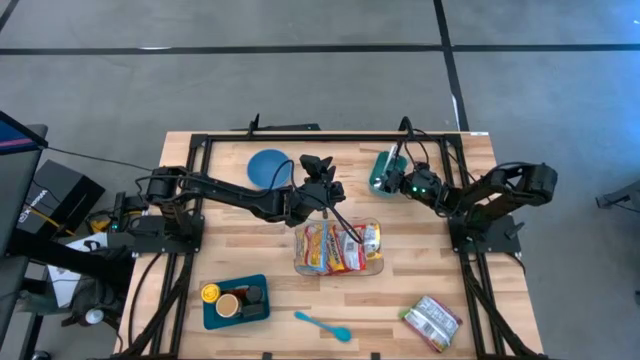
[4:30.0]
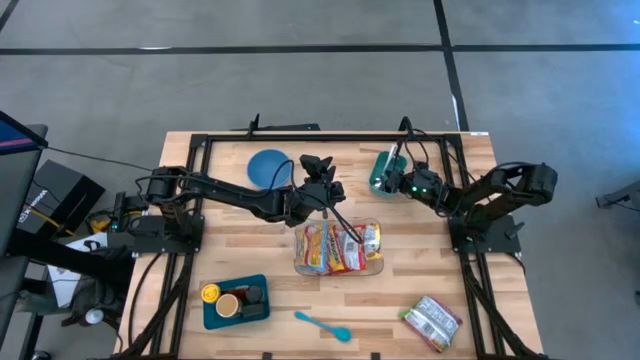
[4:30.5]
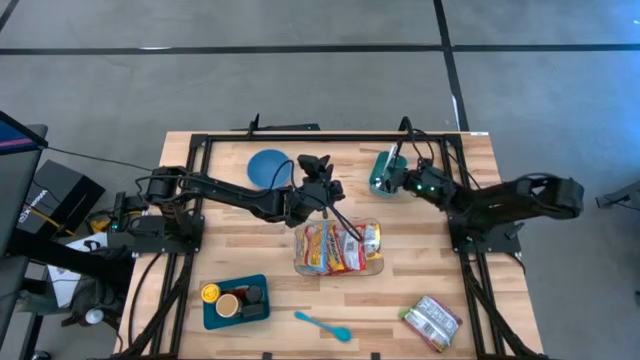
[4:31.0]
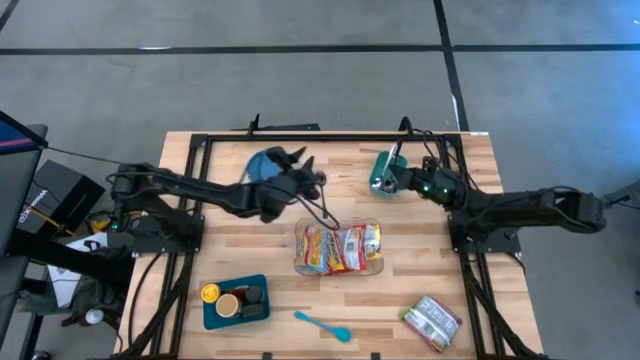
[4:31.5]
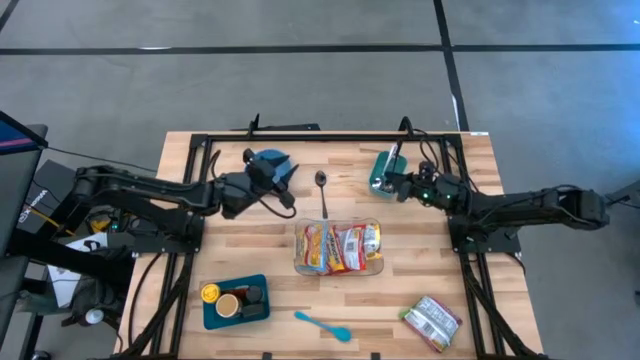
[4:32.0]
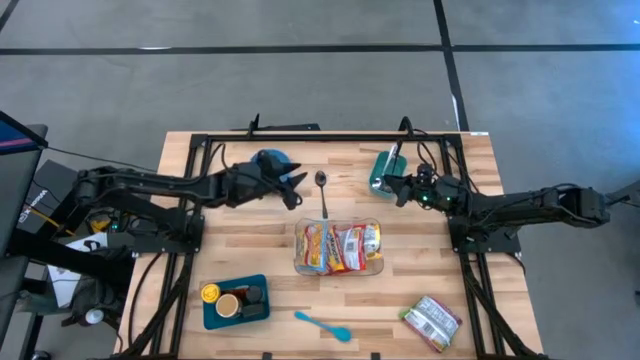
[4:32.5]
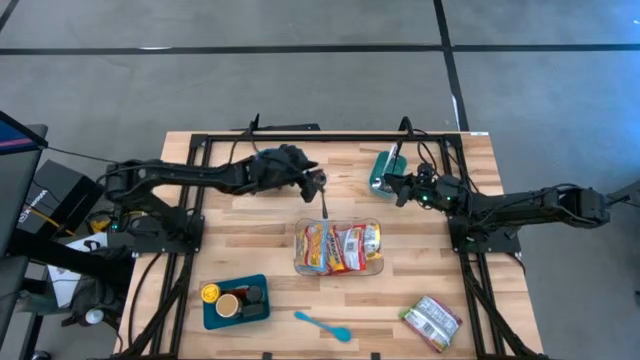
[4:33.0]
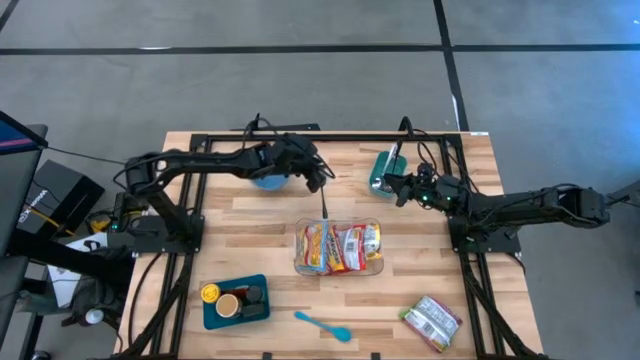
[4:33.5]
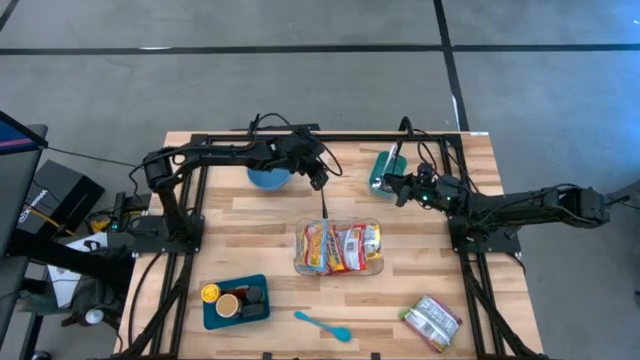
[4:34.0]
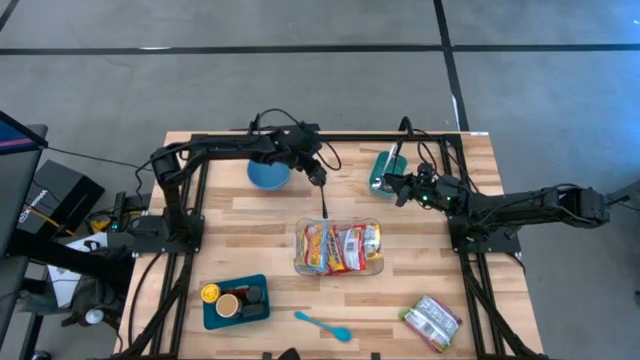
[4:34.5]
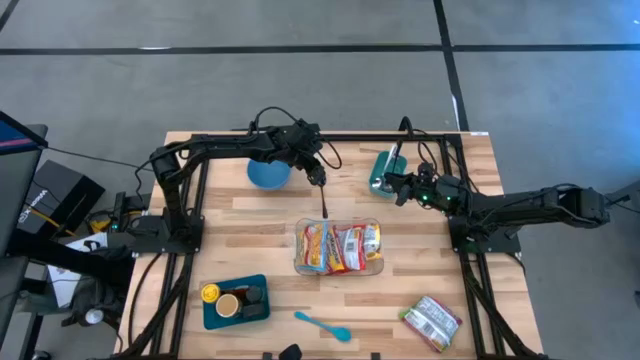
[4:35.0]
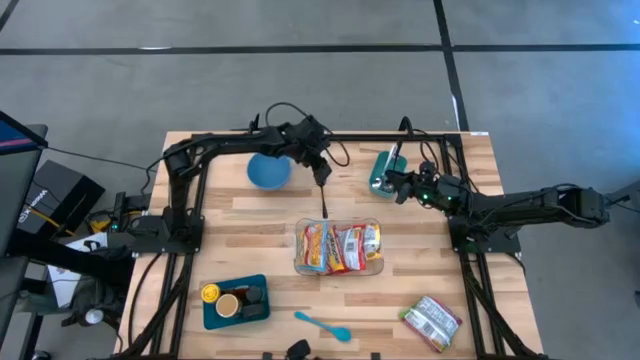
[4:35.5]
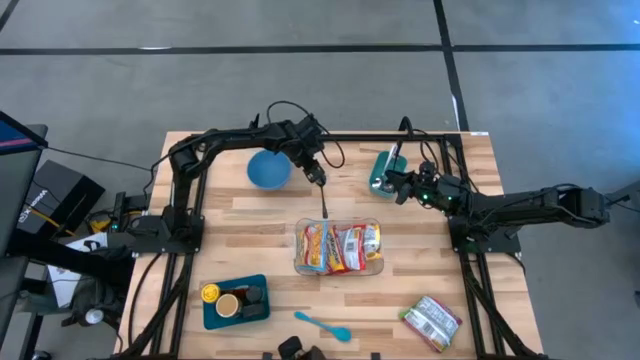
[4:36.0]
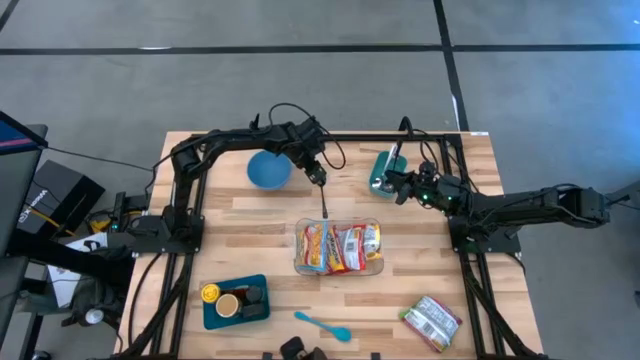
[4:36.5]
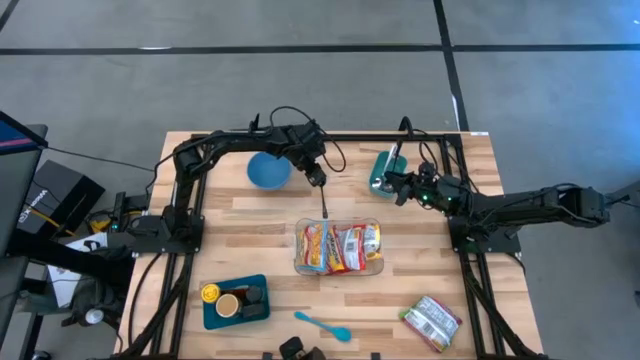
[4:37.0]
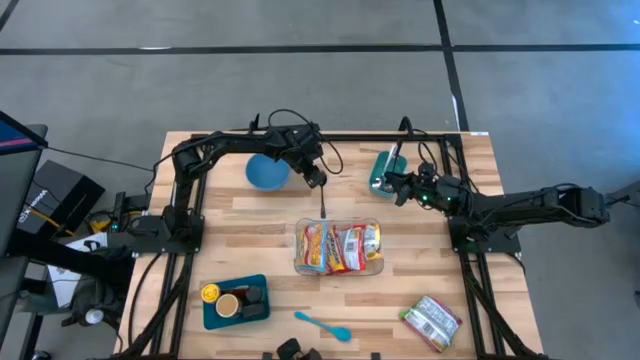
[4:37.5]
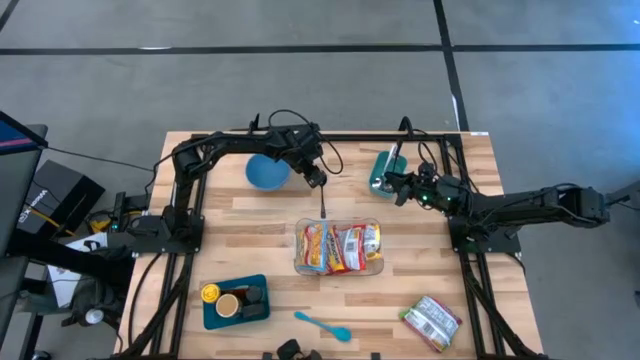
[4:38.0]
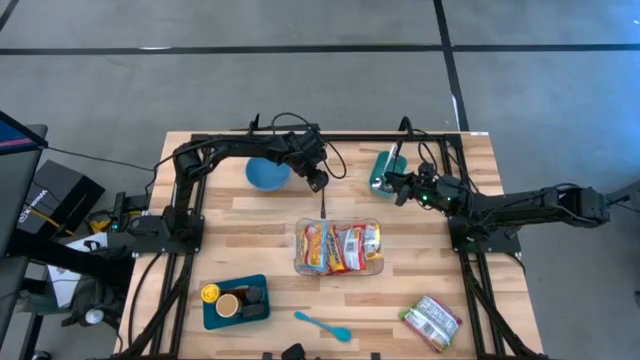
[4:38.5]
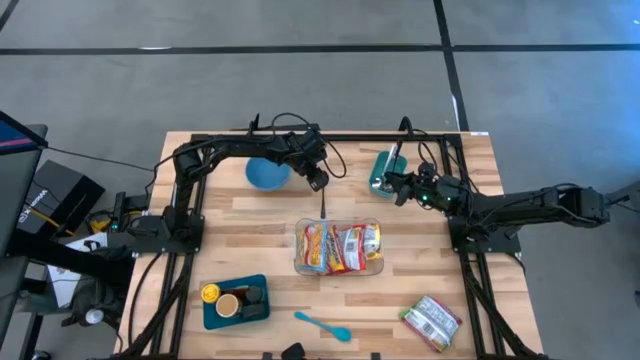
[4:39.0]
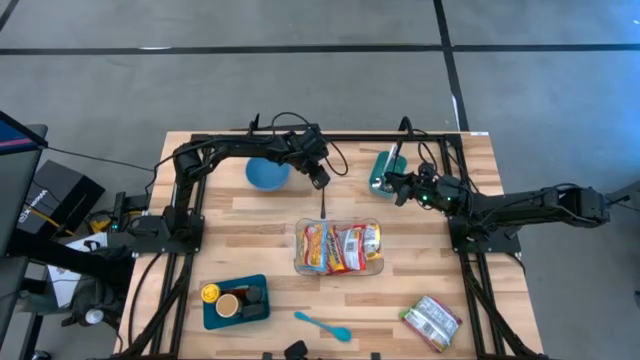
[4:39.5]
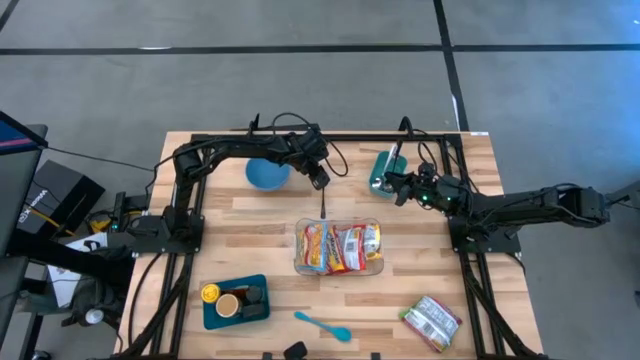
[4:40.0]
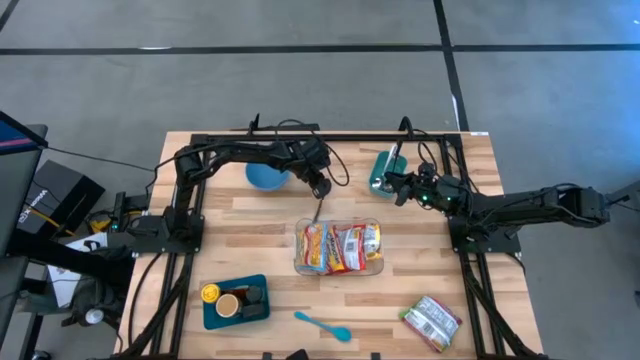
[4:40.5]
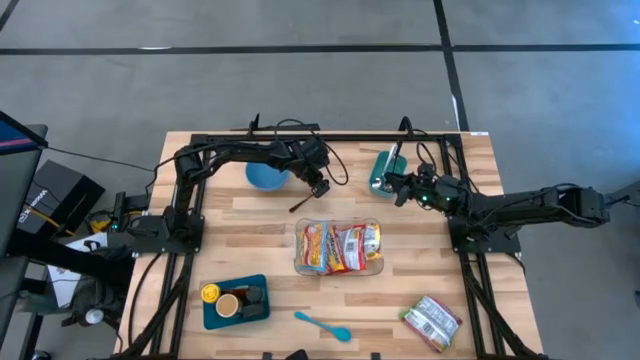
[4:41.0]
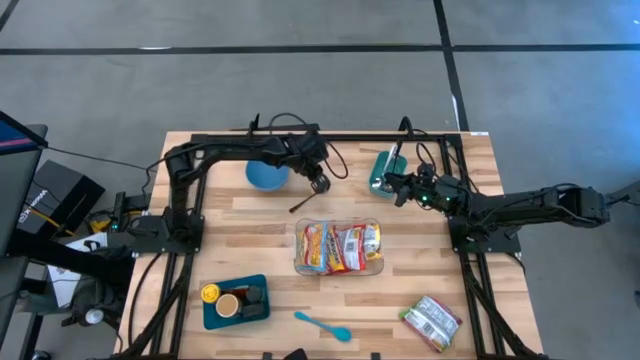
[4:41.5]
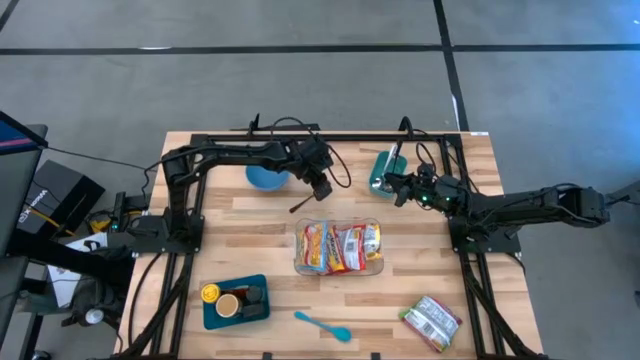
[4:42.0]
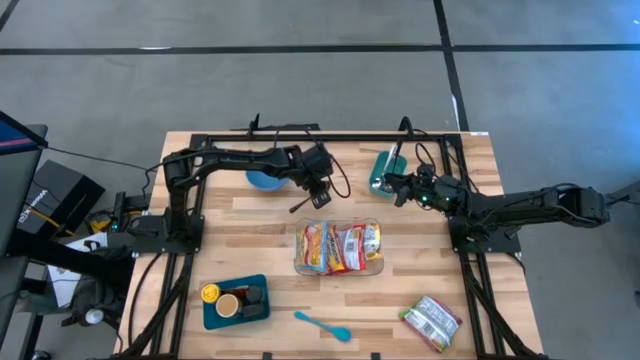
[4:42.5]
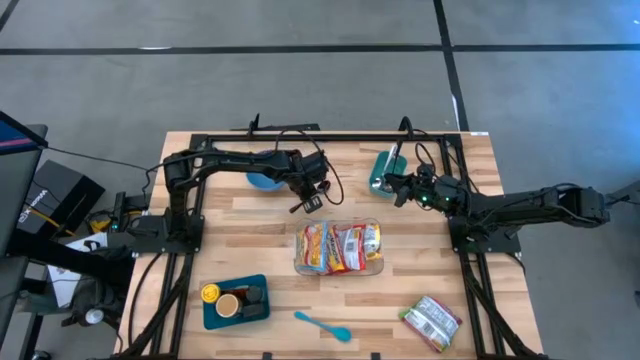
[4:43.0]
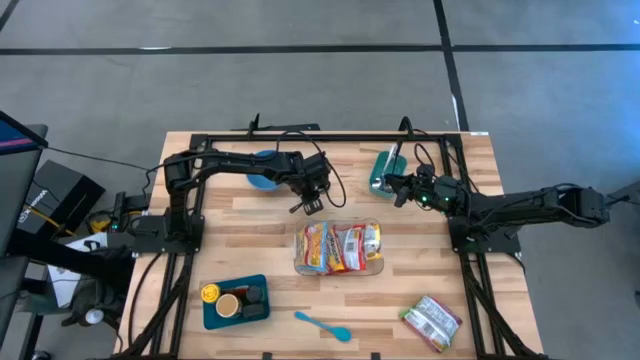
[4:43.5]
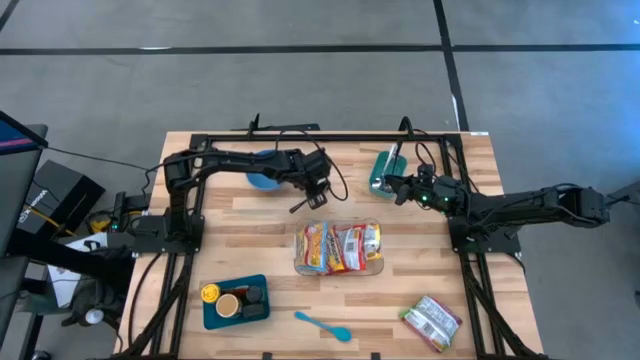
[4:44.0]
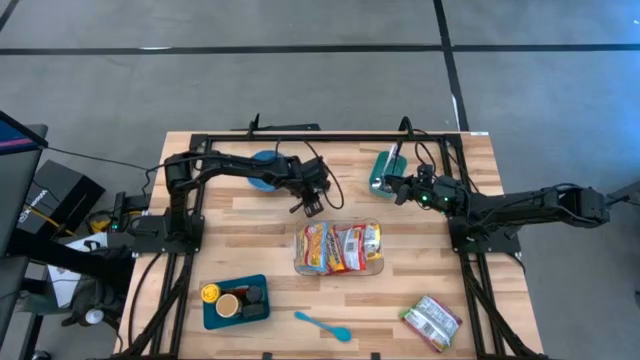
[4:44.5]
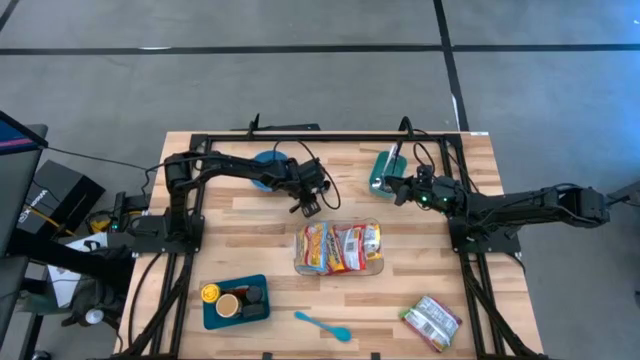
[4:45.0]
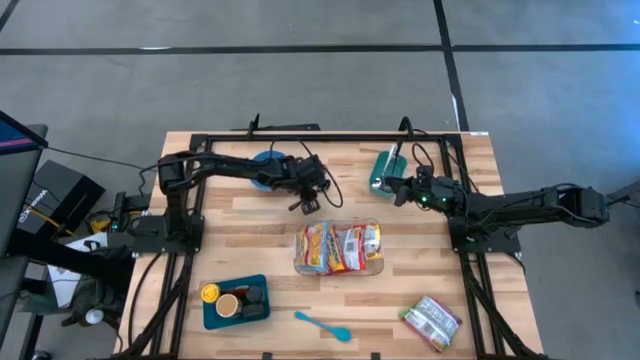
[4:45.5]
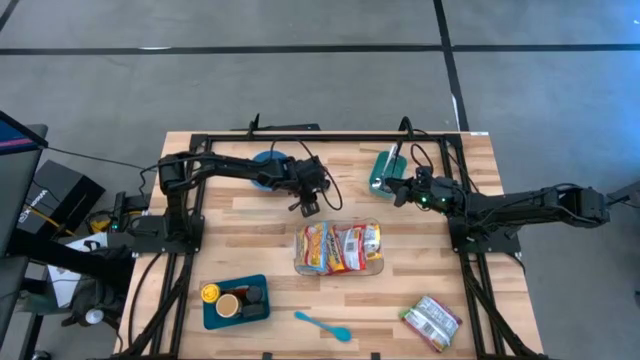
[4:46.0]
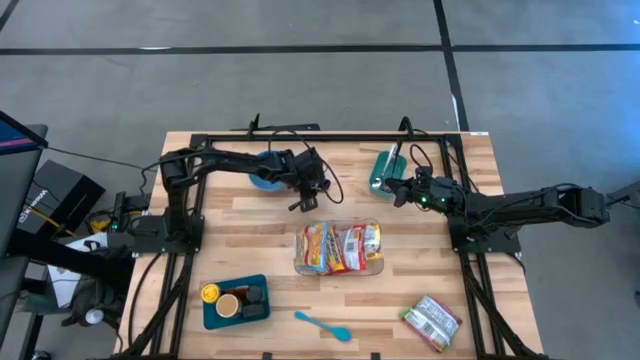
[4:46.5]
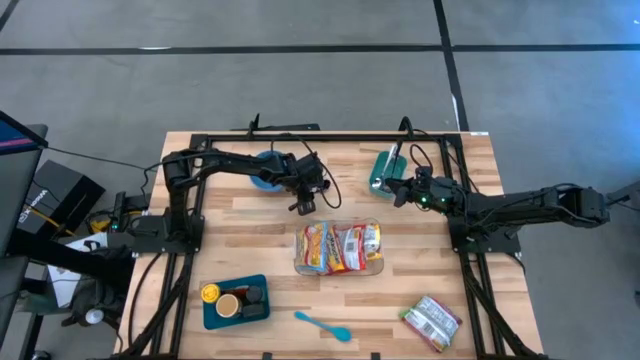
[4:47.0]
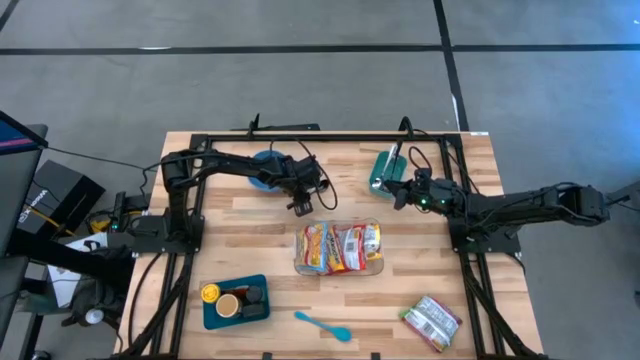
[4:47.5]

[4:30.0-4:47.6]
Task: Pick & Place Food Item
Put the black spoon into the blue bin

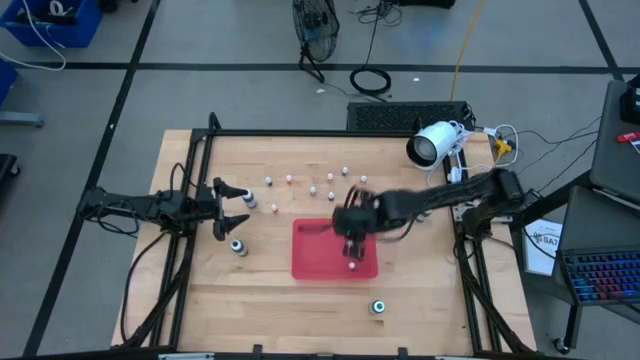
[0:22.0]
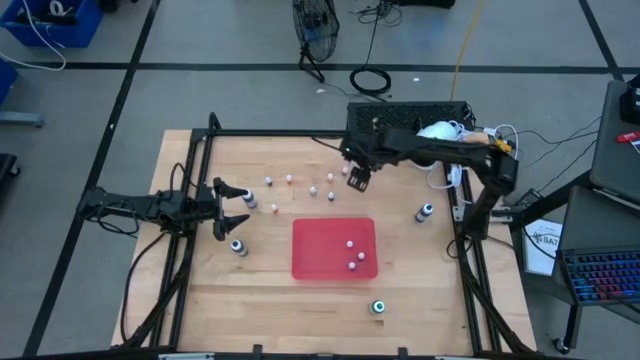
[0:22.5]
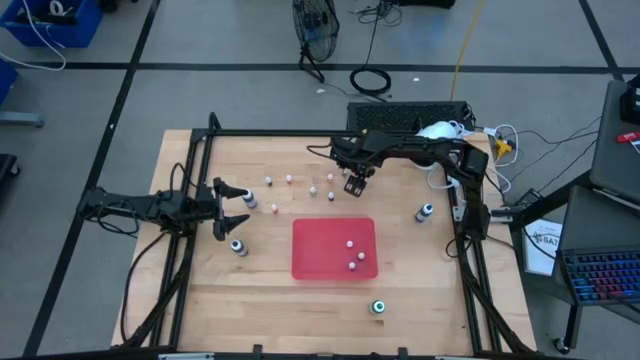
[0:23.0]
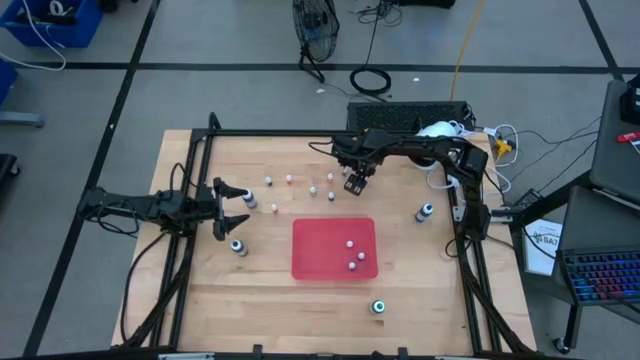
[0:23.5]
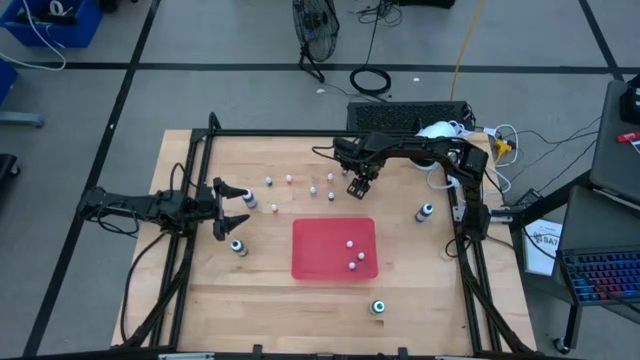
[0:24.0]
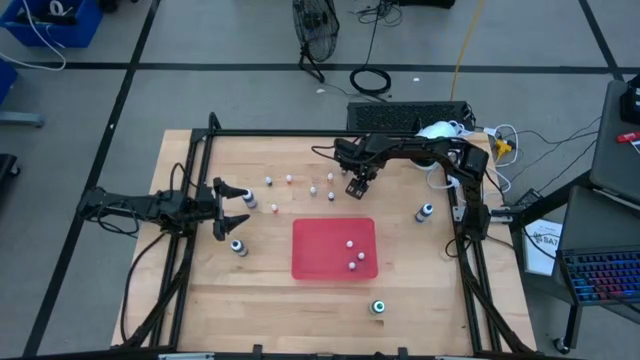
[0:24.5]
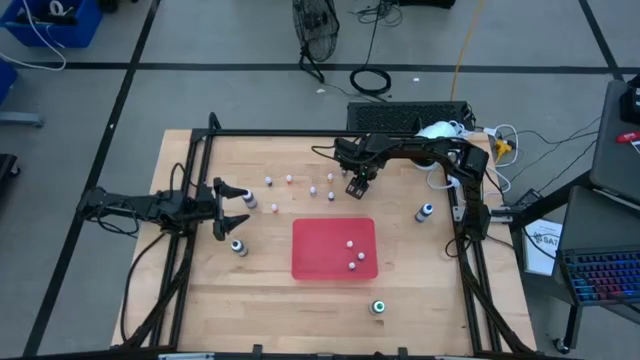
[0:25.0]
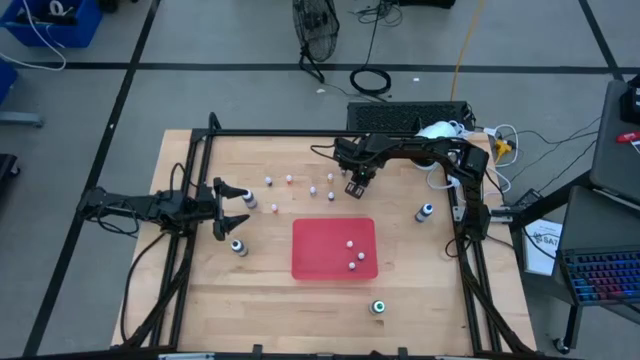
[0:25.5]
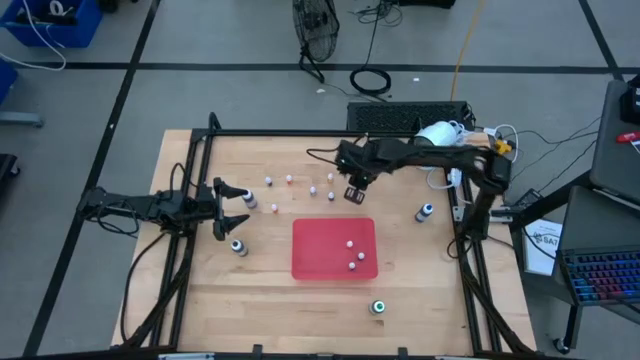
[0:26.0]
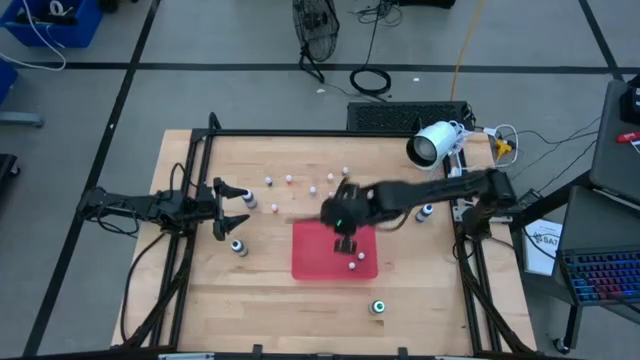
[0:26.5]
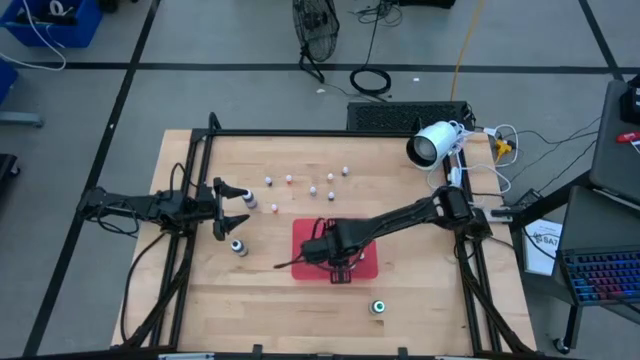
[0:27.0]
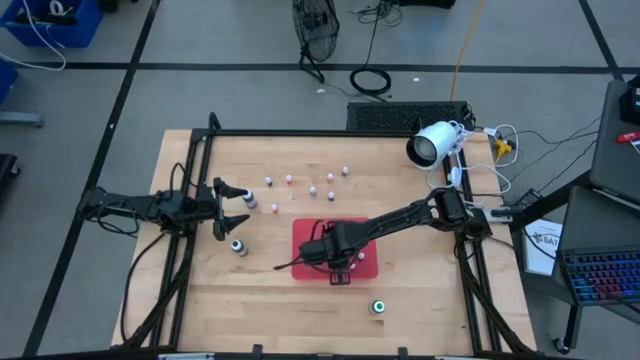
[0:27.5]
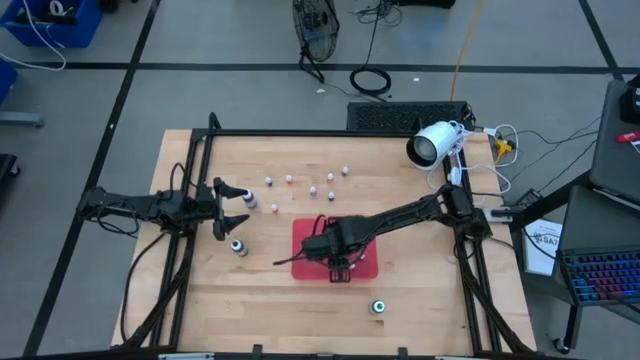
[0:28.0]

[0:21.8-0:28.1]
Task: Pick & Place food coloring
Put the small orange food coloring bottle into the pink bin
